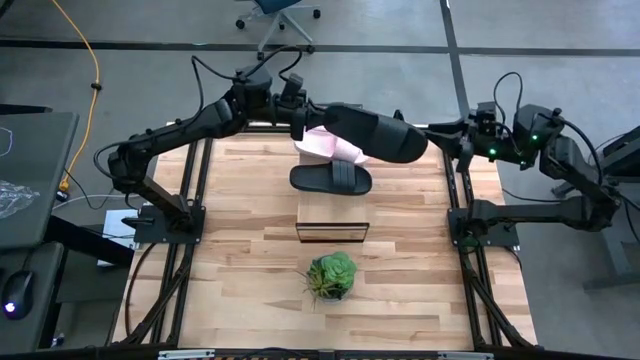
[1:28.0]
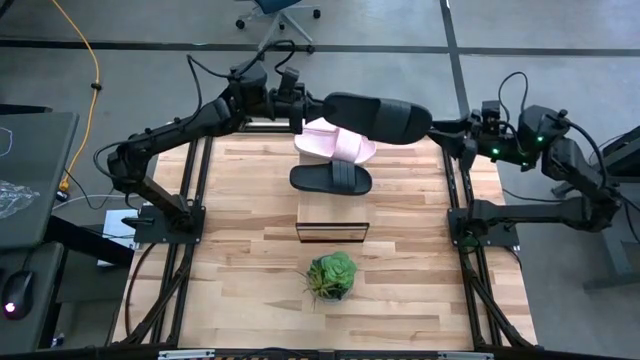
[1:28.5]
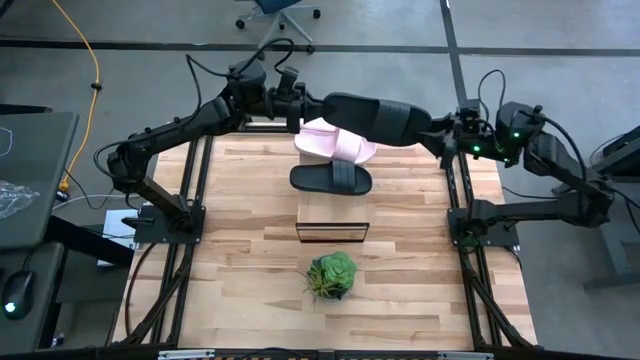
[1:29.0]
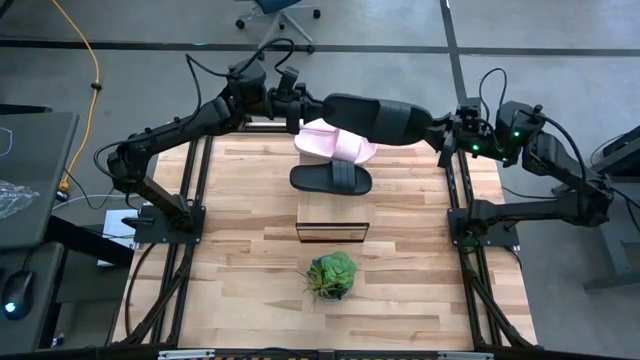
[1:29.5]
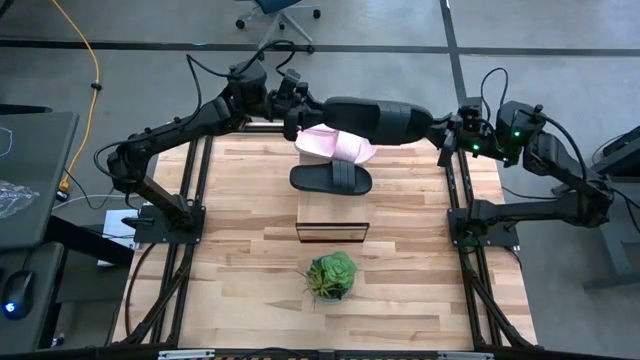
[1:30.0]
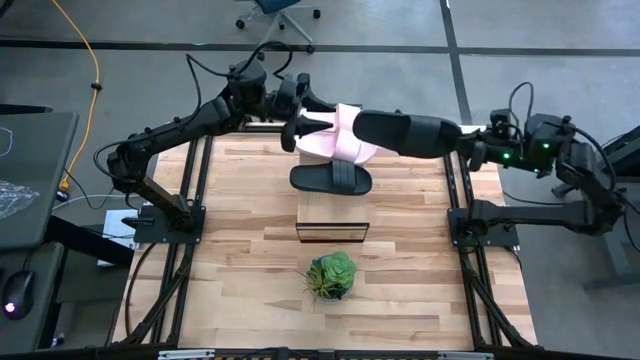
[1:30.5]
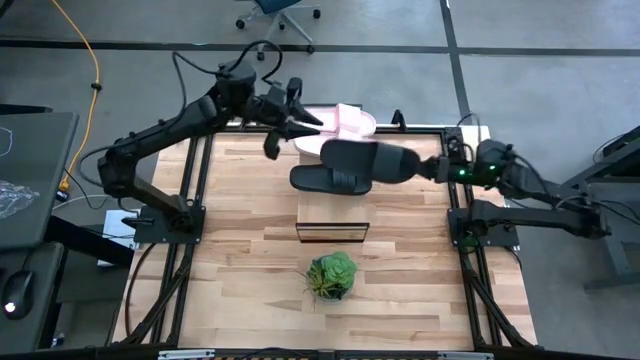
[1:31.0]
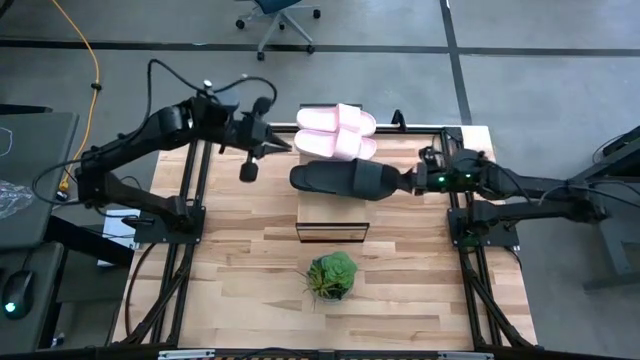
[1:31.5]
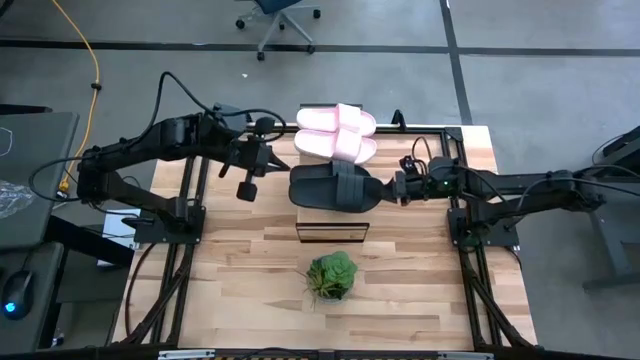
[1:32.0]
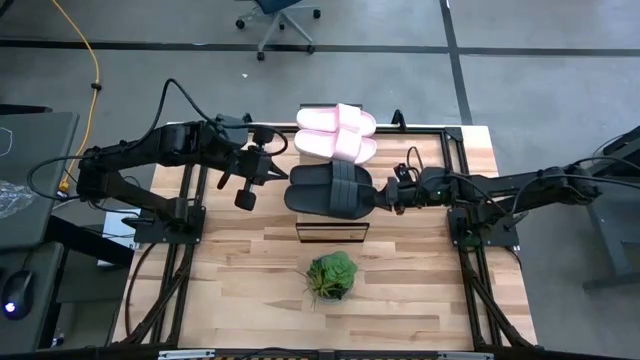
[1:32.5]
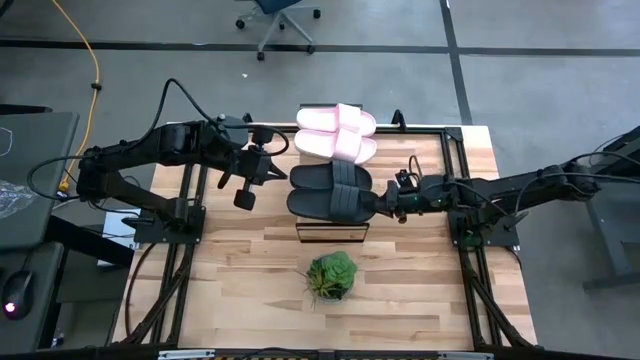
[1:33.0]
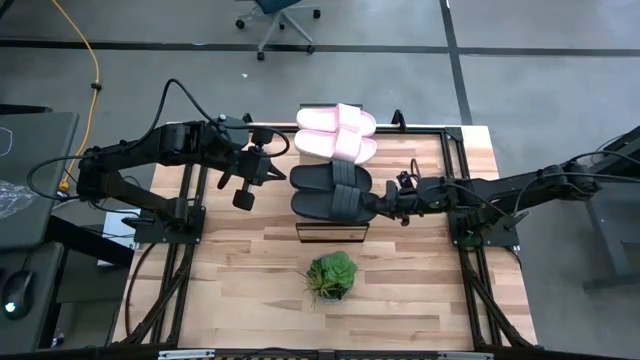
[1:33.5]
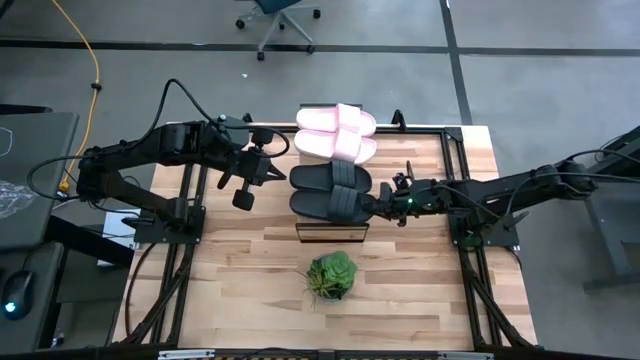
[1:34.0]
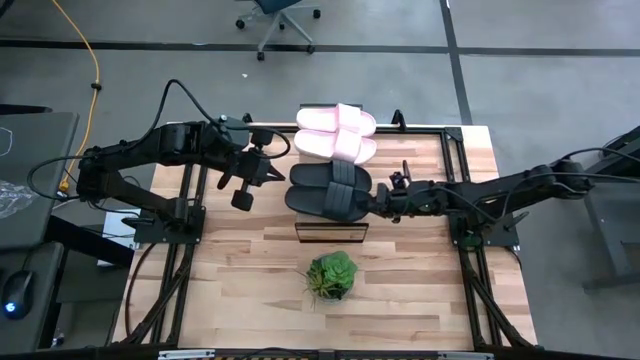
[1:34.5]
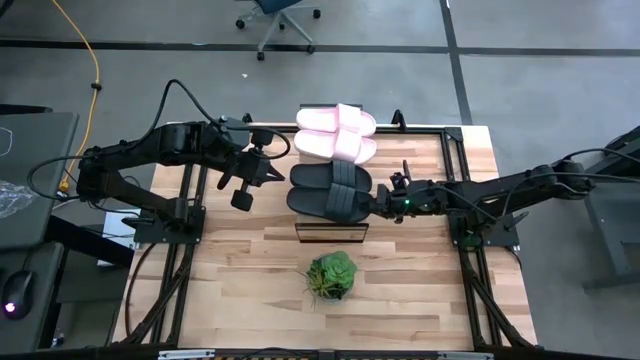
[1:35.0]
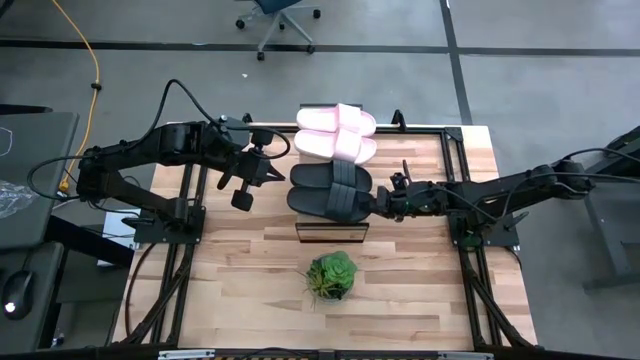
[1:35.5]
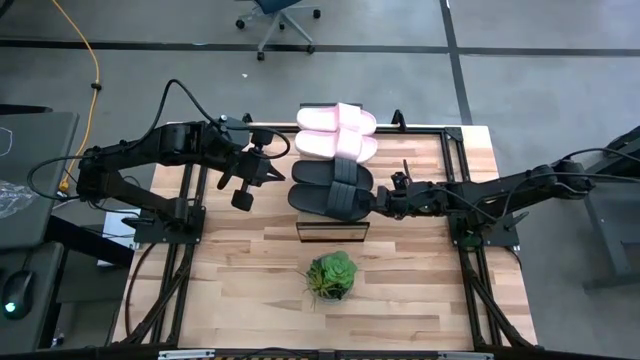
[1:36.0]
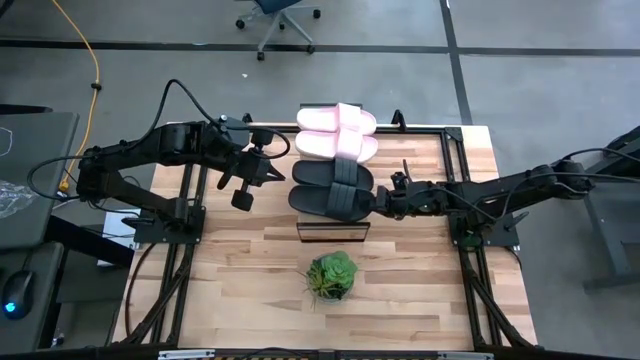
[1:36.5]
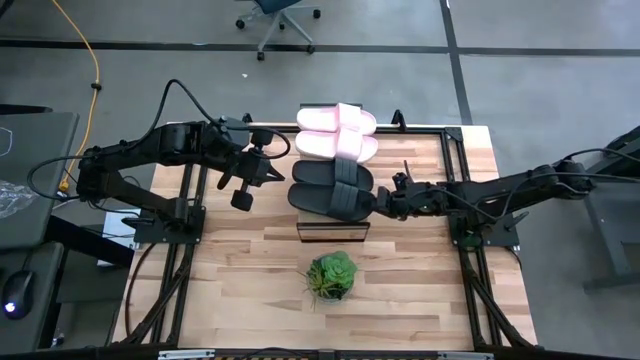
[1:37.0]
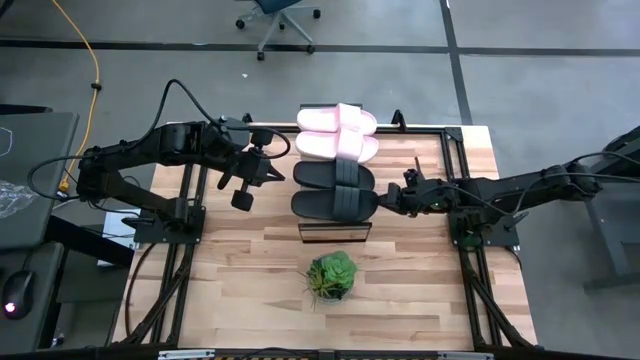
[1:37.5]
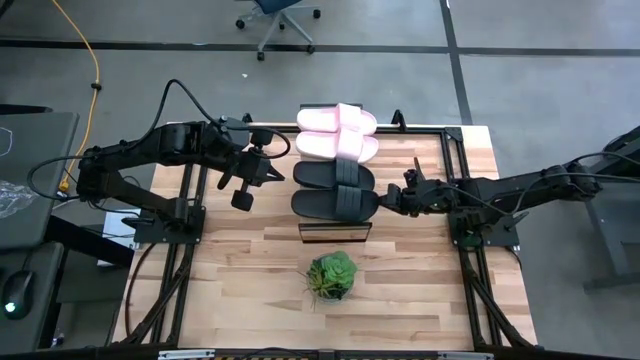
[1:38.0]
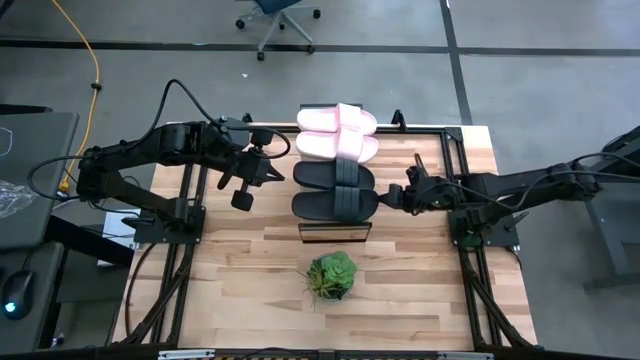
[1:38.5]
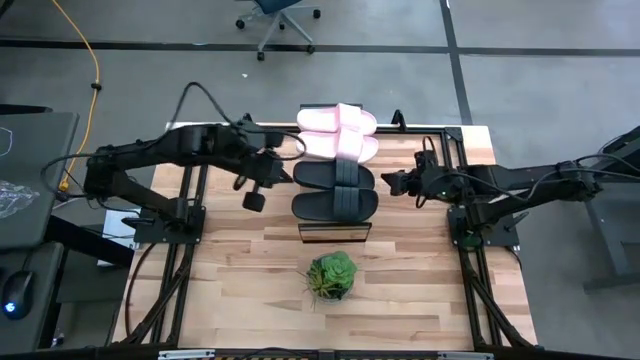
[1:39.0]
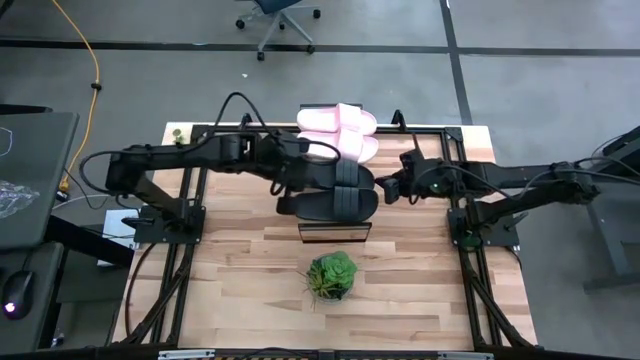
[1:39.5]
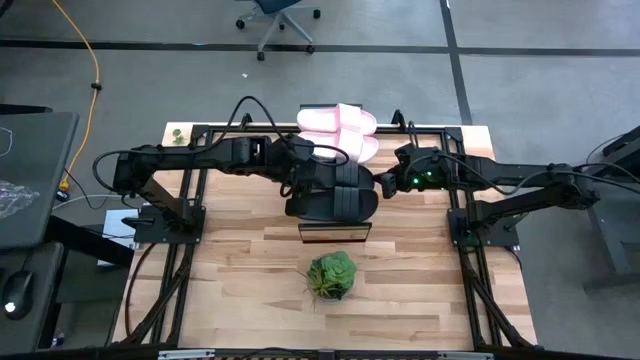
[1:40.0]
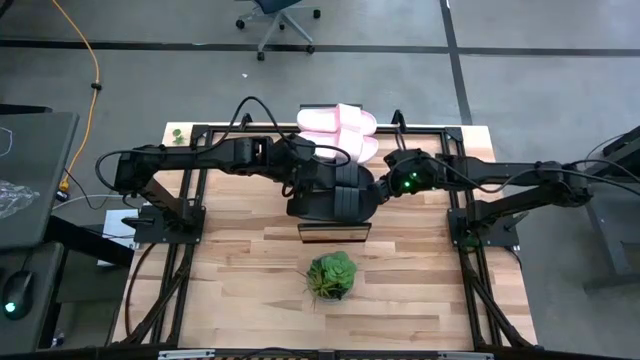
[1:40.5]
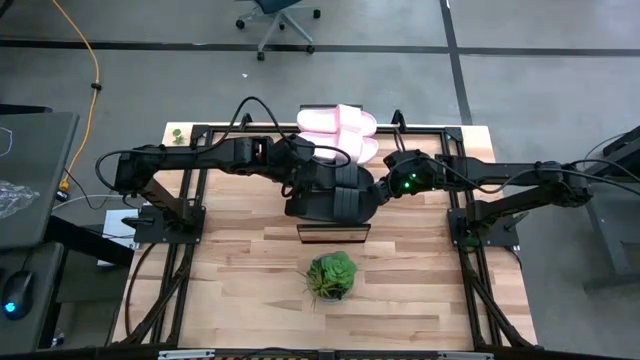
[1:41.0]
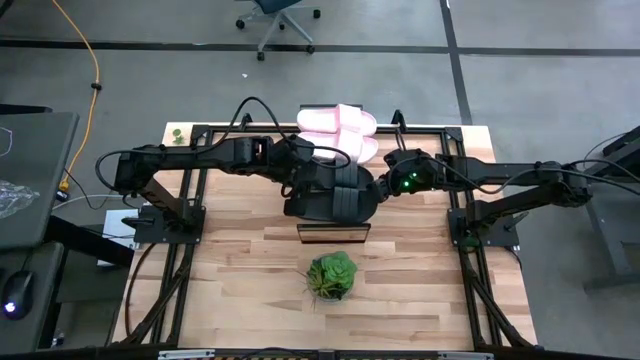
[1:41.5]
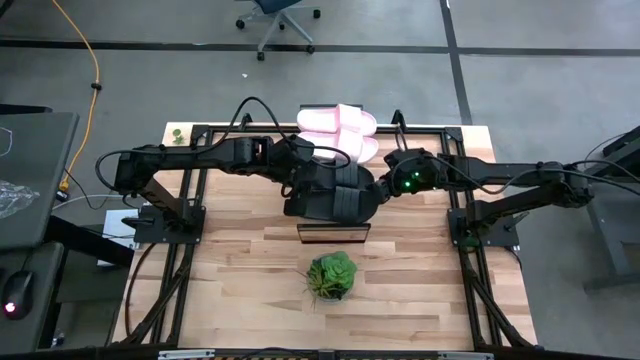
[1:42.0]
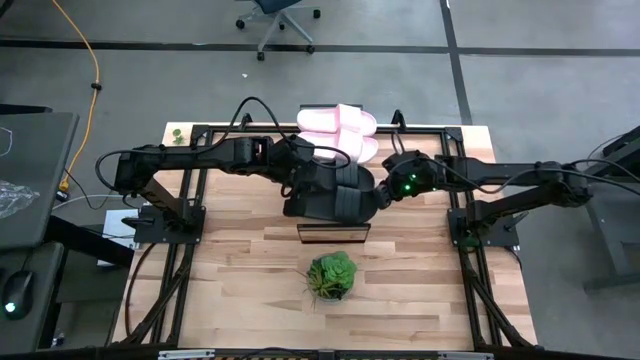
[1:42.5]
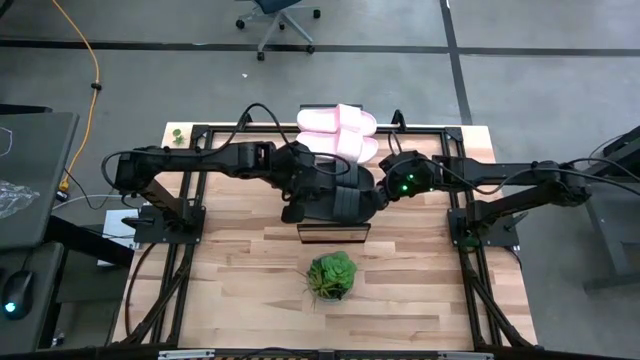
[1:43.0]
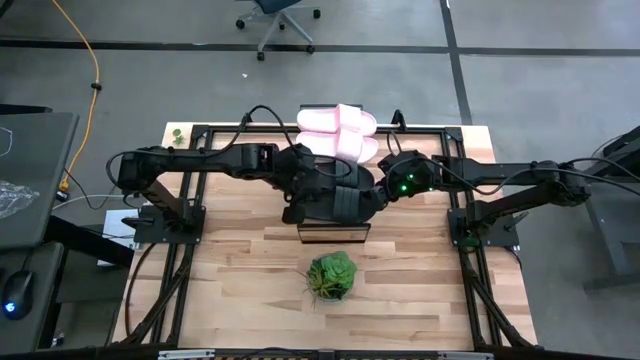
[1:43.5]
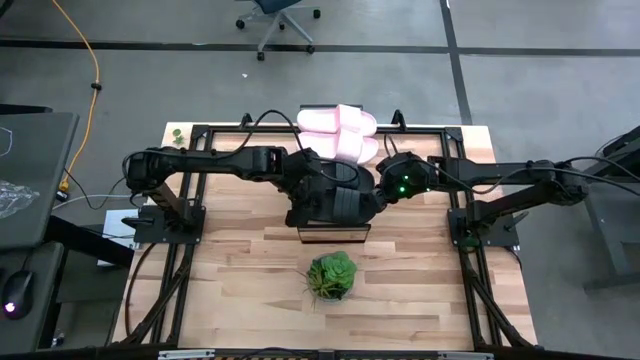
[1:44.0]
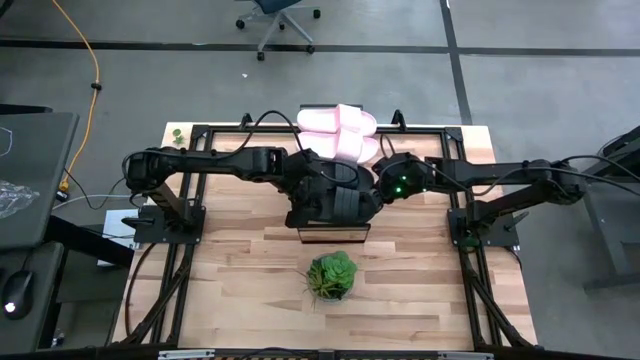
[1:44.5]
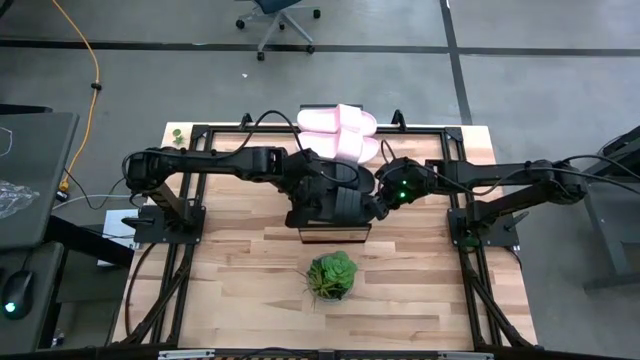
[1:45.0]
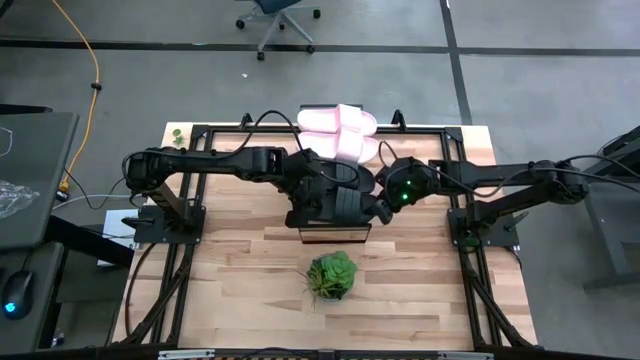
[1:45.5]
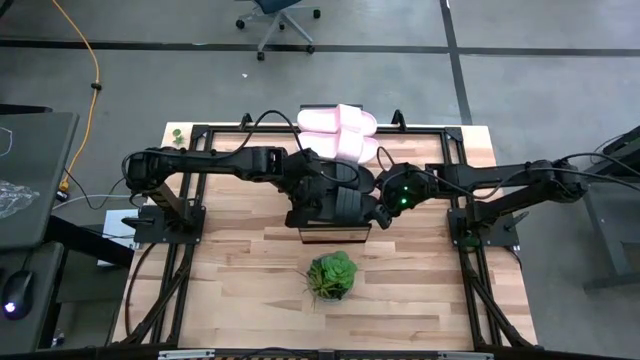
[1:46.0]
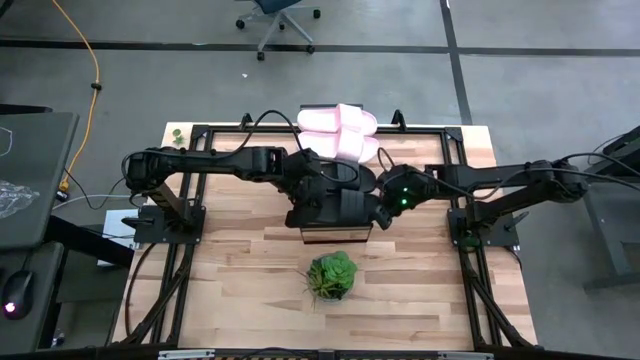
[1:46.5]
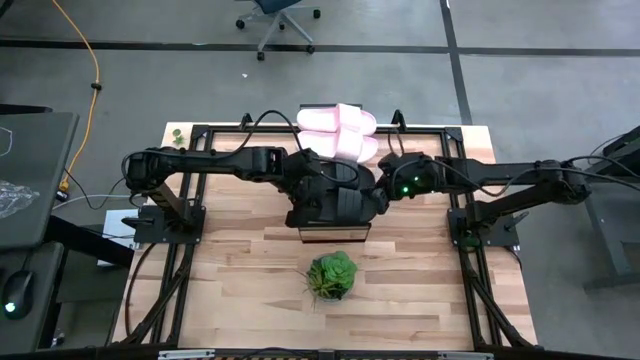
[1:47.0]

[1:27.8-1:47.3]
Task: Pick and place slides into the shelf
Put the black slide on the shelf
